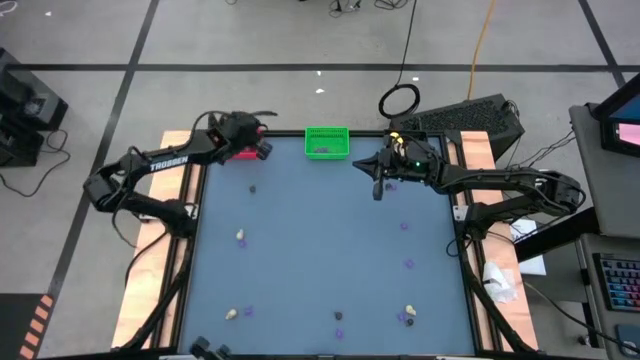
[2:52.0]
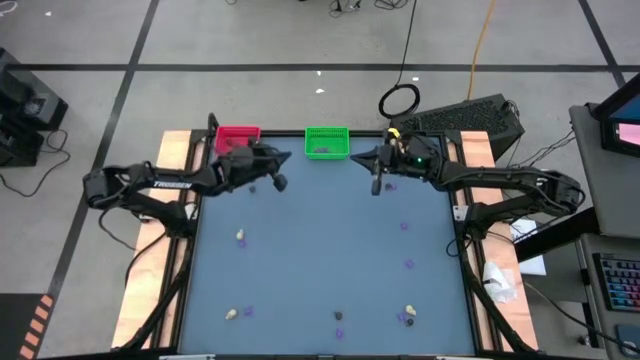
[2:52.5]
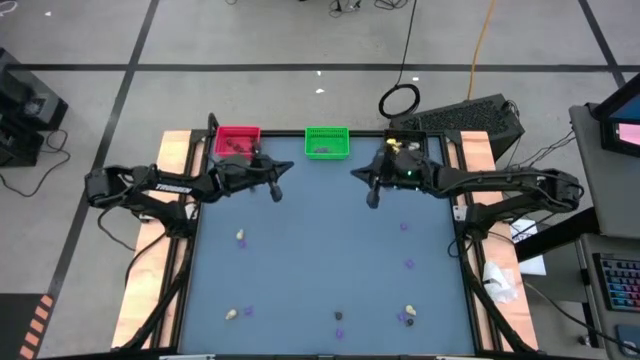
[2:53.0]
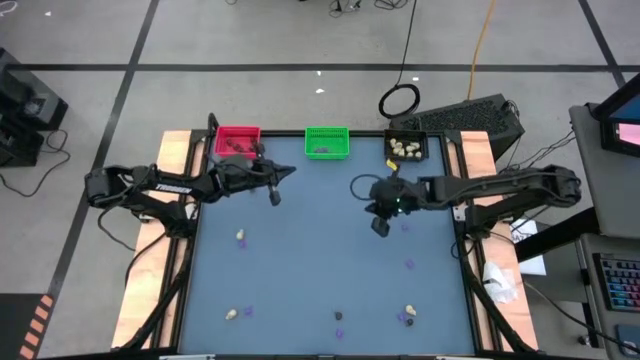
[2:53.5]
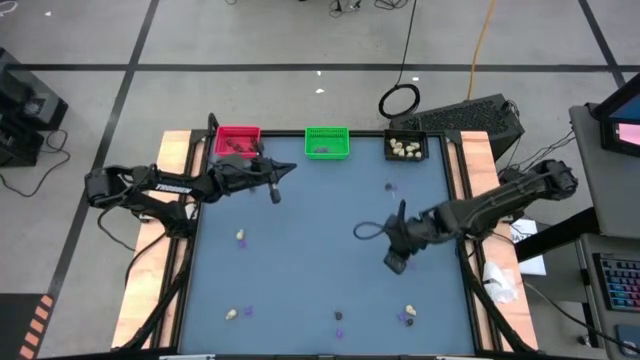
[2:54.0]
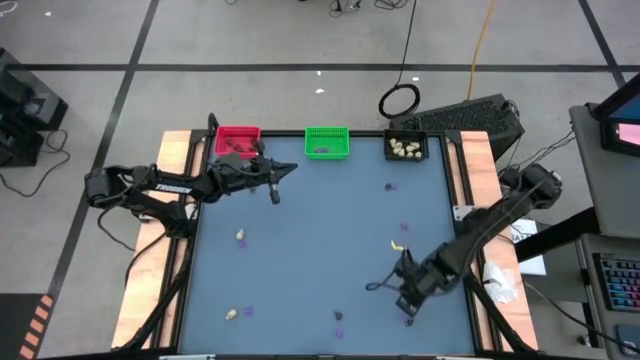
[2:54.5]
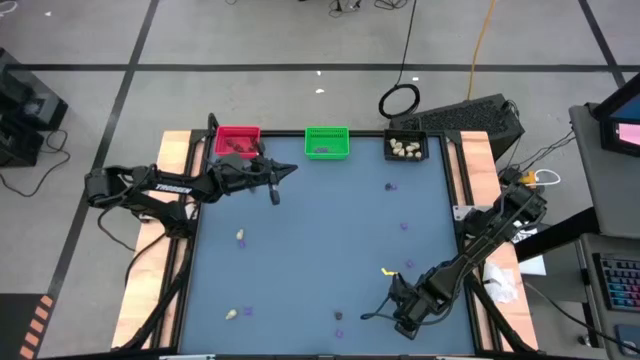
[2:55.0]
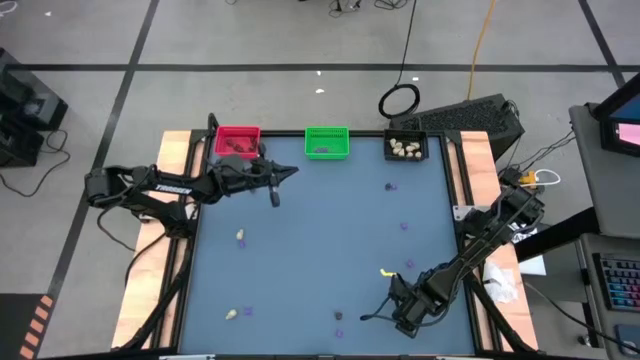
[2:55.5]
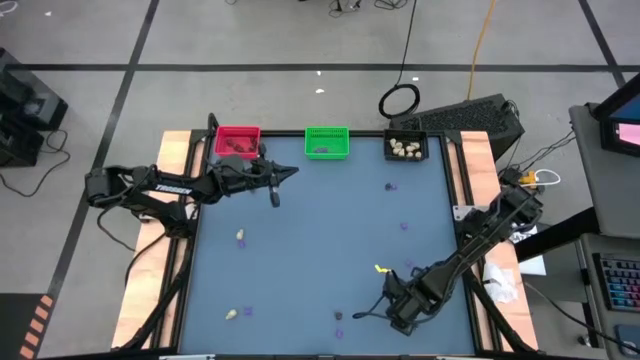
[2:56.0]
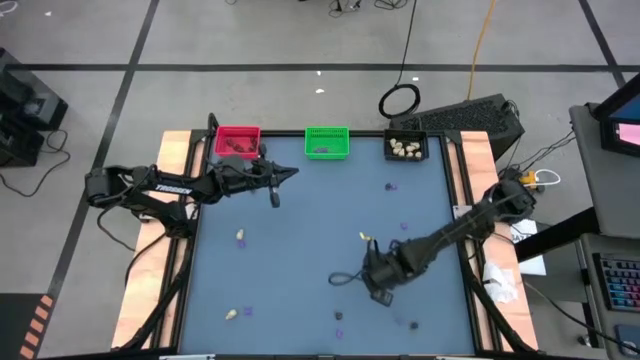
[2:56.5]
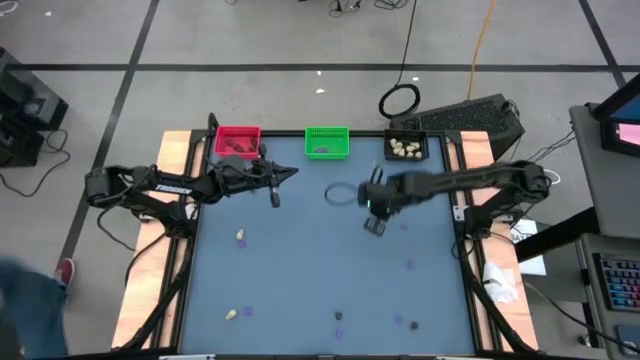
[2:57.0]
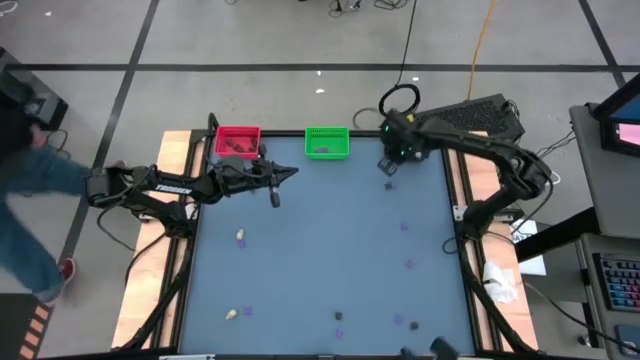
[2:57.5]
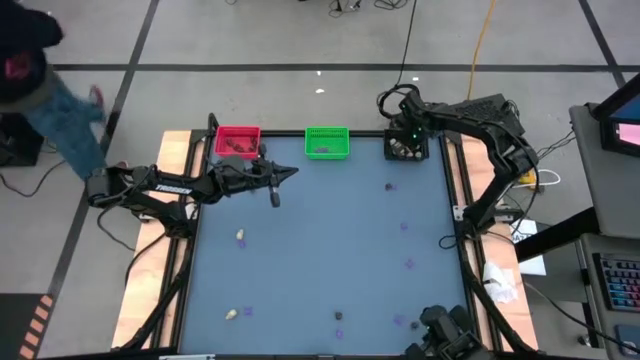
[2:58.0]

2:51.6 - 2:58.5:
Task: Sort Halloween decoration
Put the white skull toy into the black bin

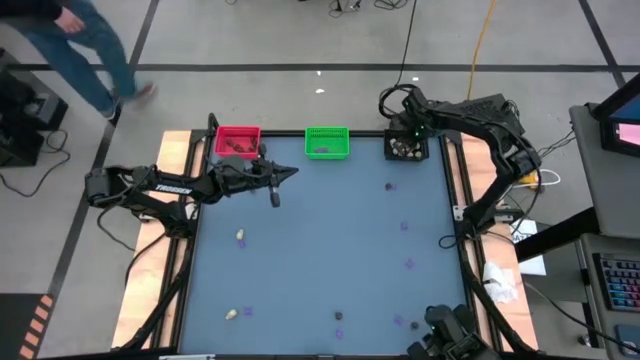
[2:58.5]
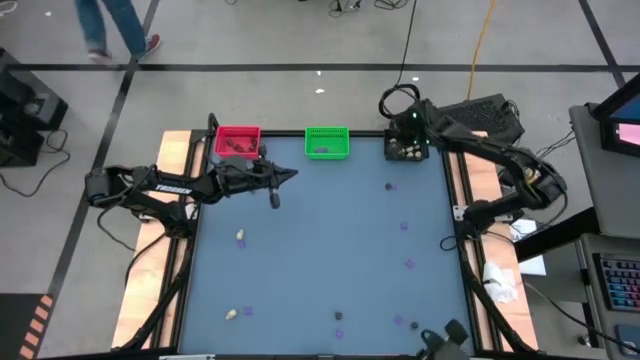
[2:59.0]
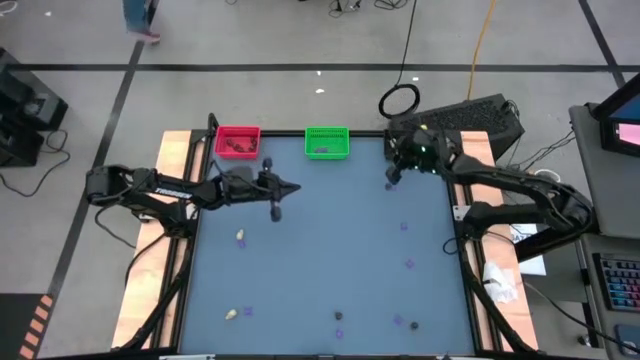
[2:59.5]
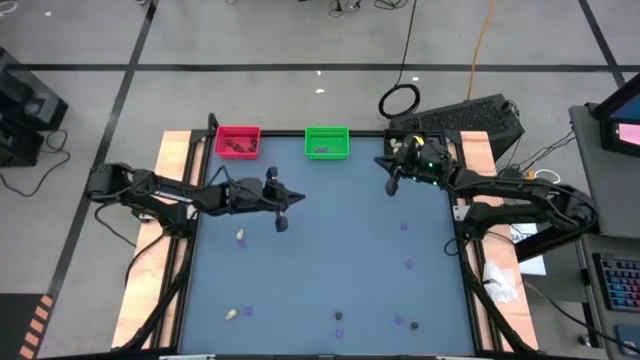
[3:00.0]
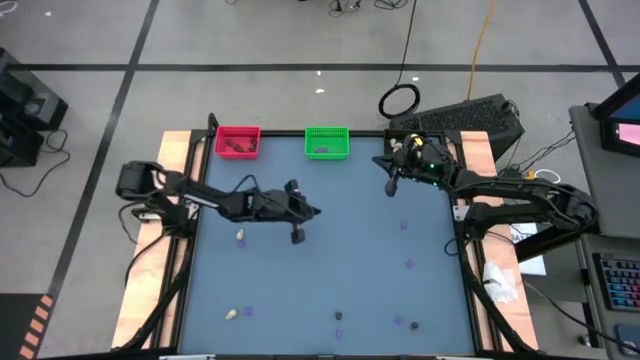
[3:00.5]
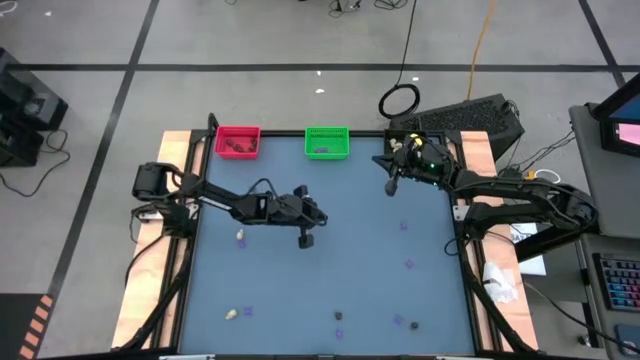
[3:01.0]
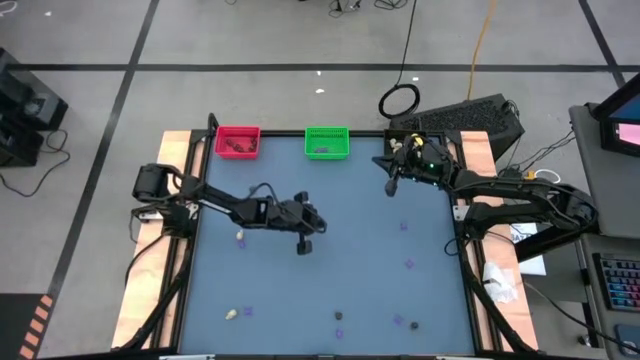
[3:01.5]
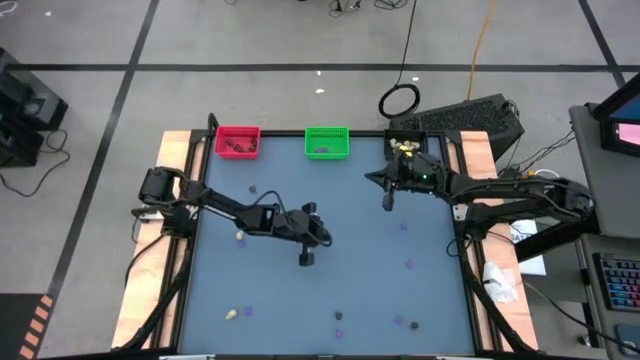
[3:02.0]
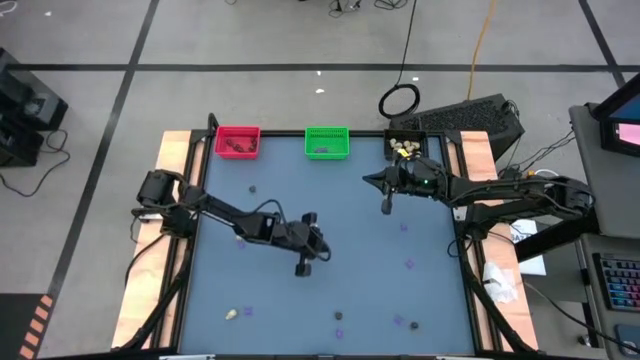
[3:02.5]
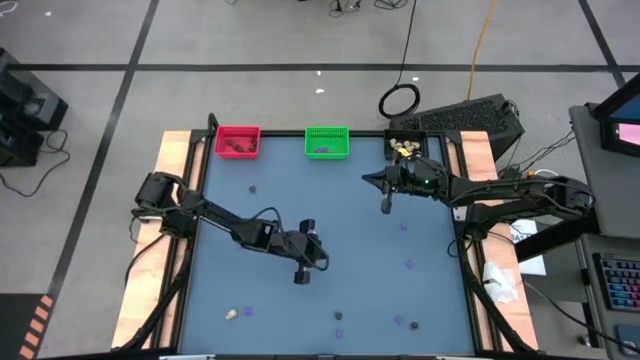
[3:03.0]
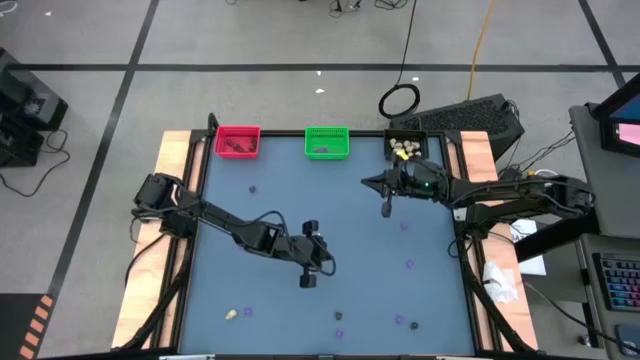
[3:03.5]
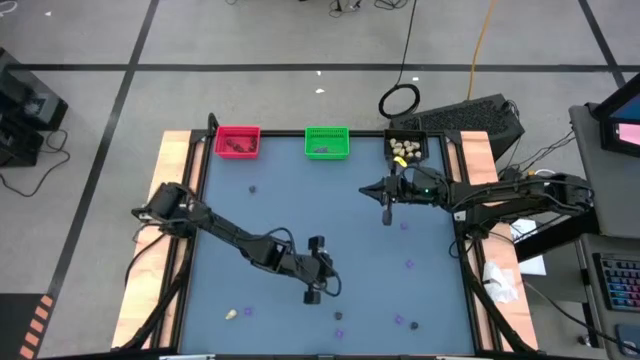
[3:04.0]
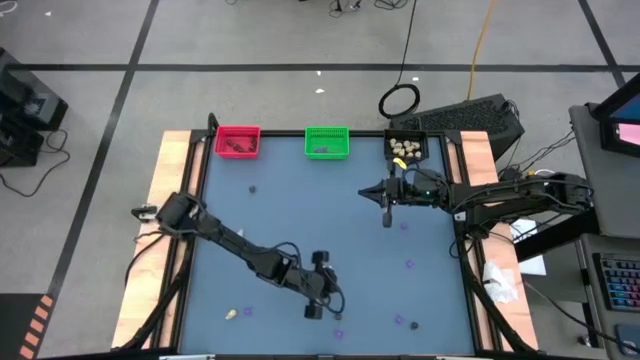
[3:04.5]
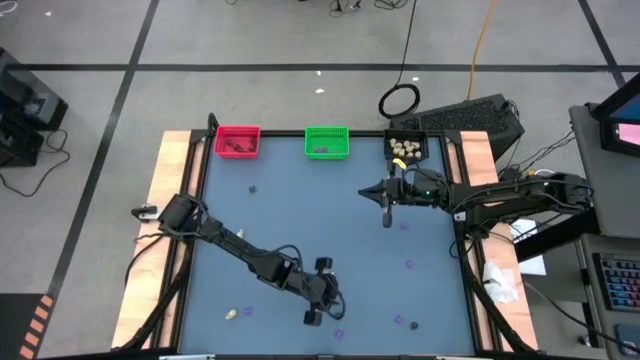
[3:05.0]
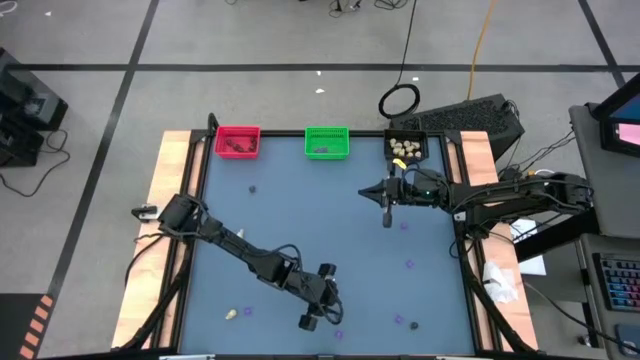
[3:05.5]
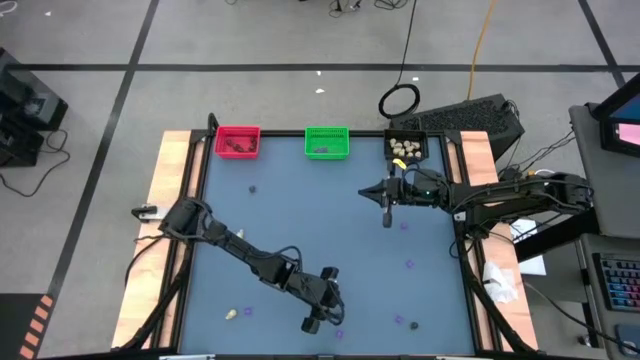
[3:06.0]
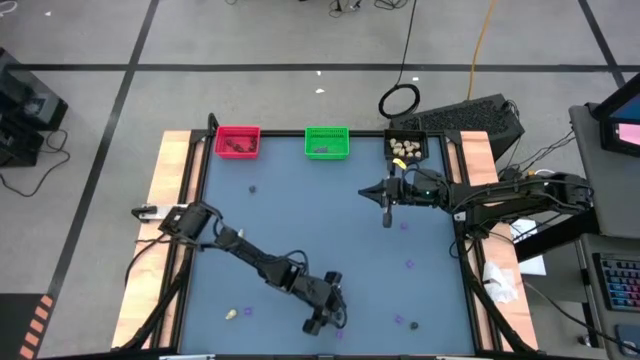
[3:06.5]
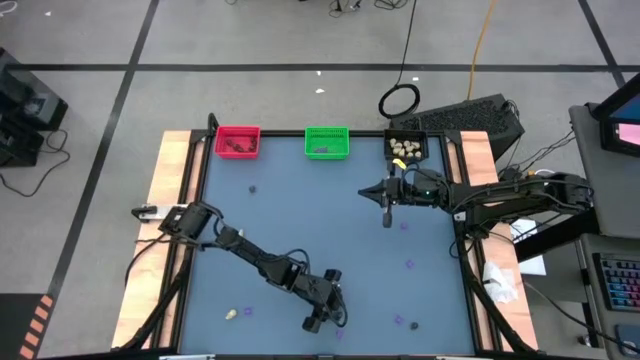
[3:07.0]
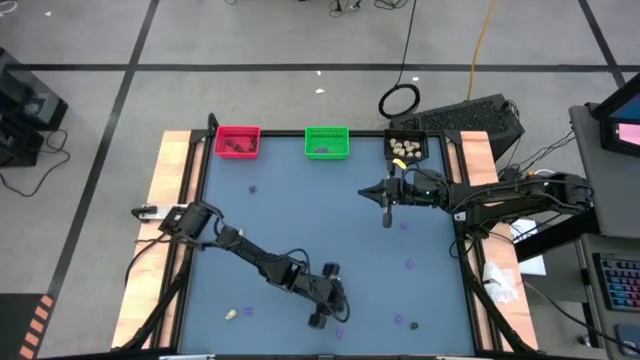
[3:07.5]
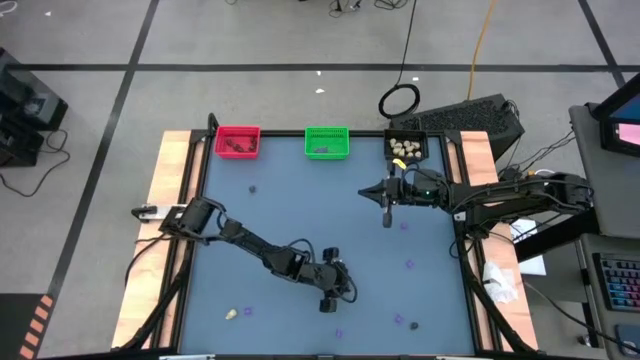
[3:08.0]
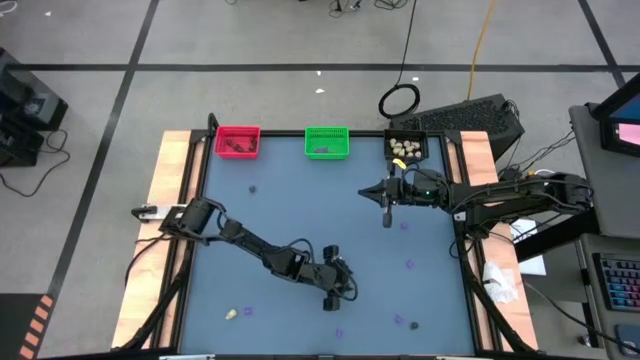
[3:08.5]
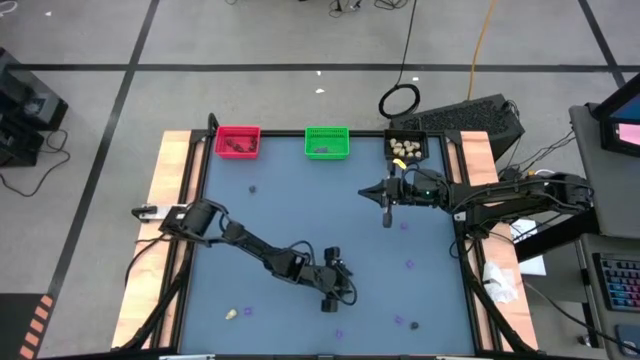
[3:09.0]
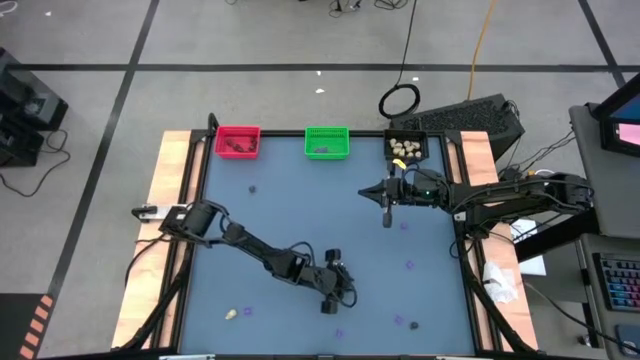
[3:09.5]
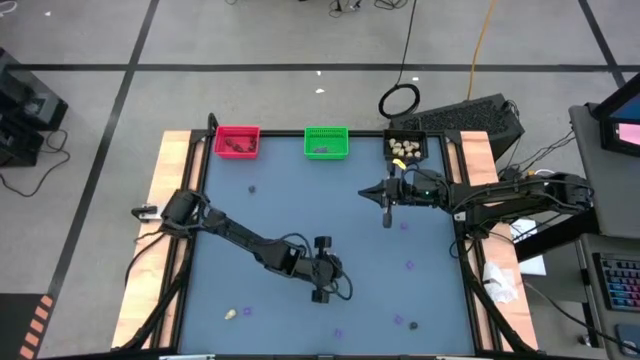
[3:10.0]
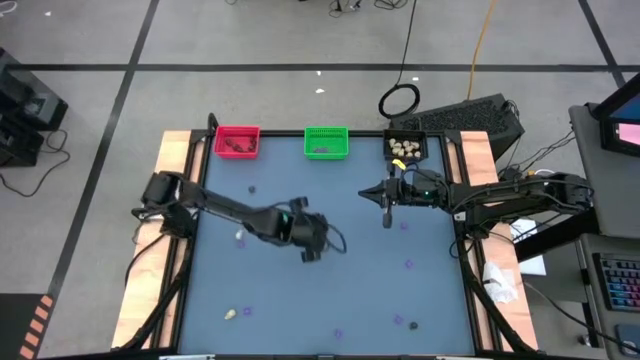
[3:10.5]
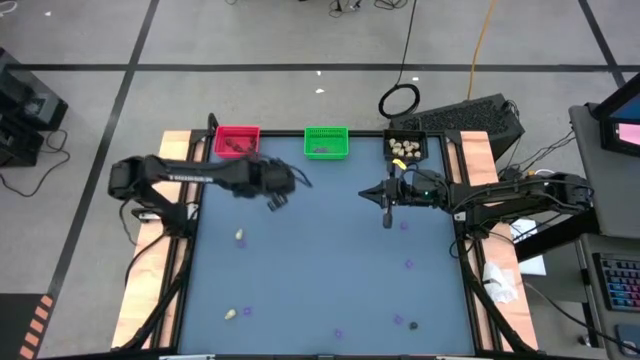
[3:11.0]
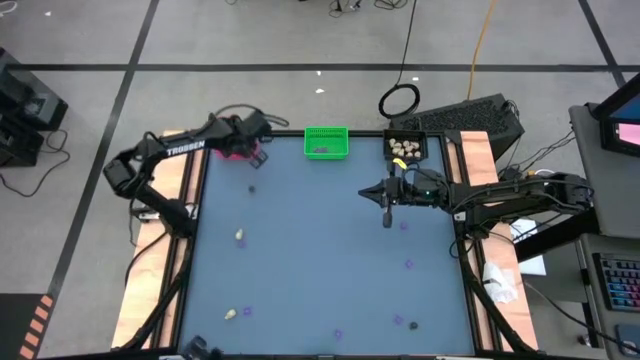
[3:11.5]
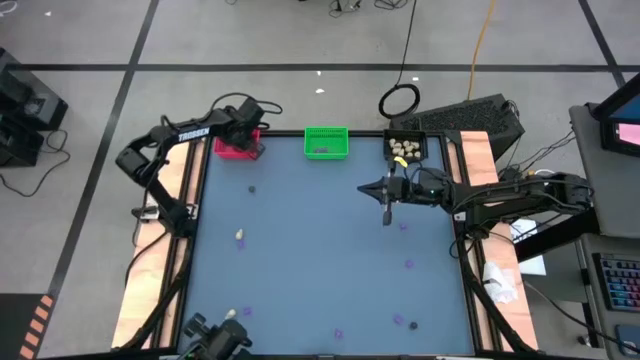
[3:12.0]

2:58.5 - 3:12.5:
Put the black skull toy into the red bin

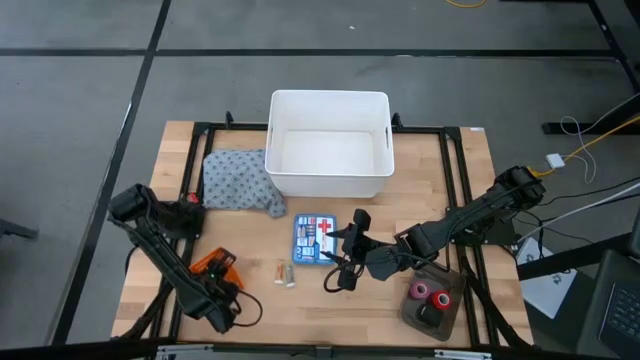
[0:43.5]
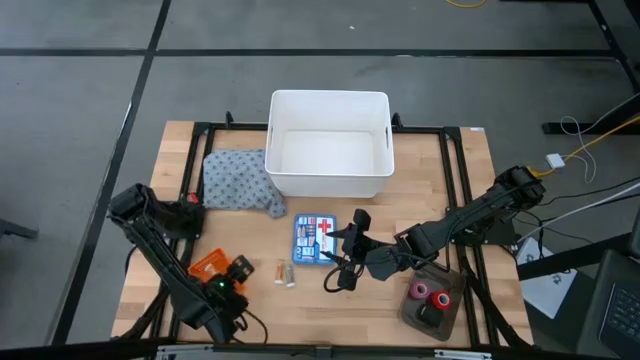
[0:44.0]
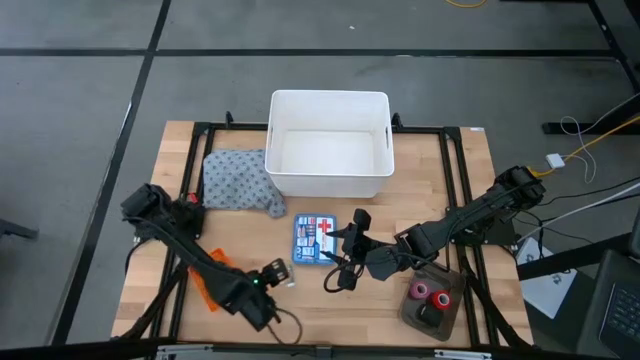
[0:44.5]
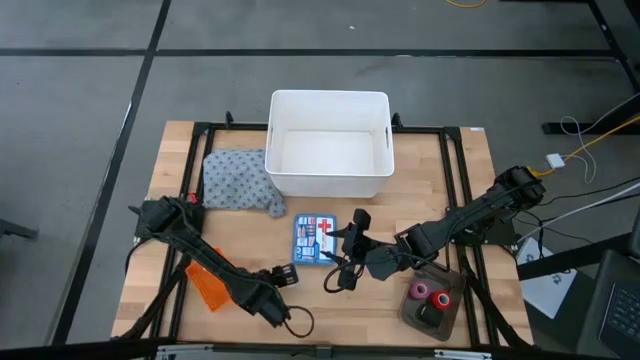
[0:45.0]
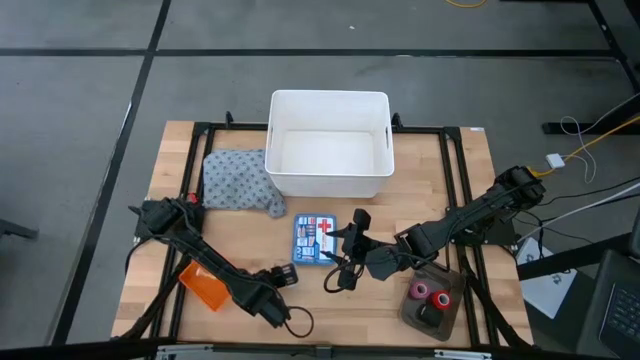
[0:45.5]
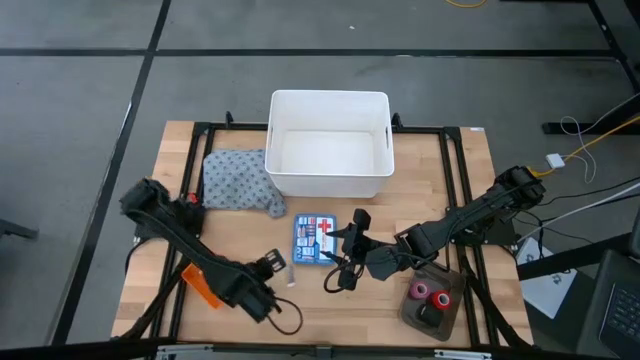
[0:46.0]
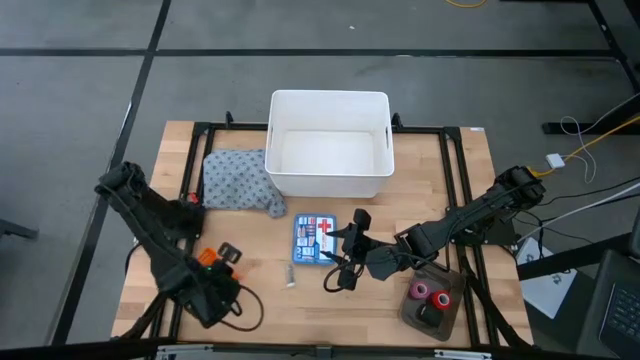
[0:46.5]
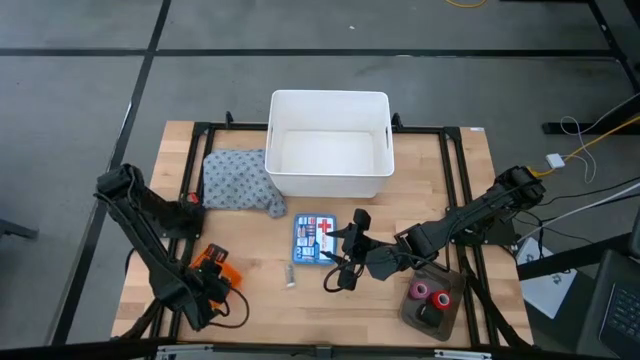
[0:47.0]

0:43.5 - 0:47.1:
Task: Pick & place medical supplies in basket/bin
Put the yellow pill bottle into the orange bin
